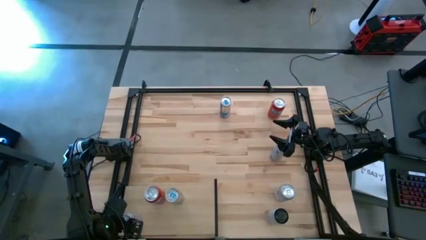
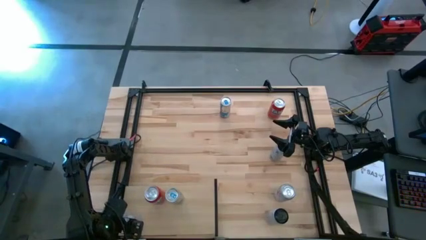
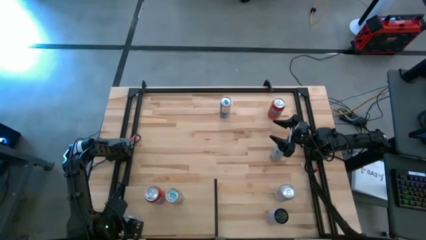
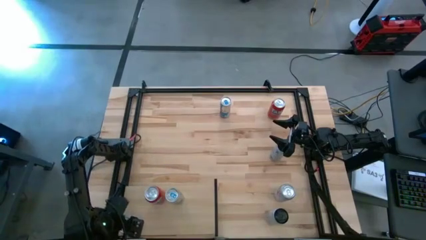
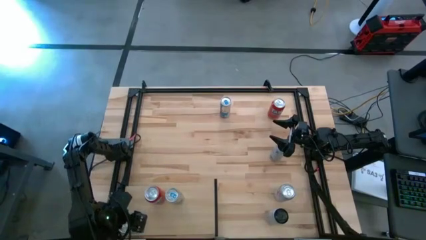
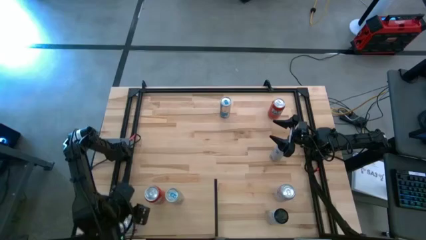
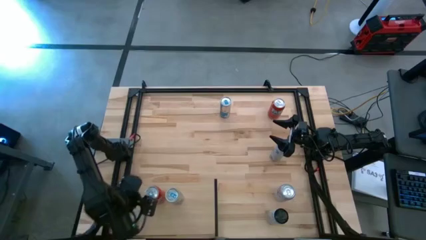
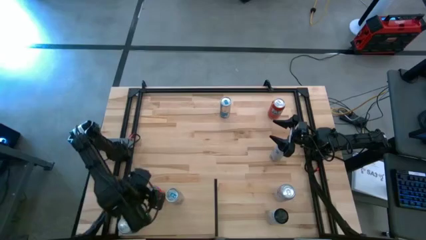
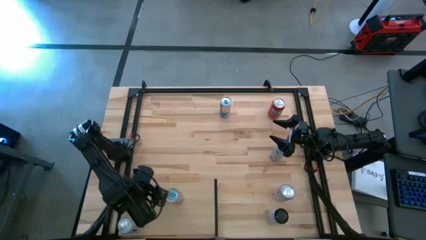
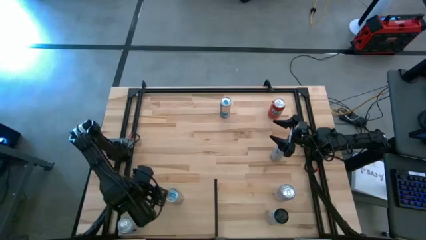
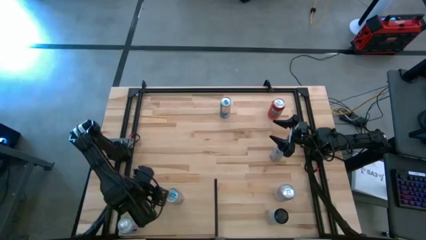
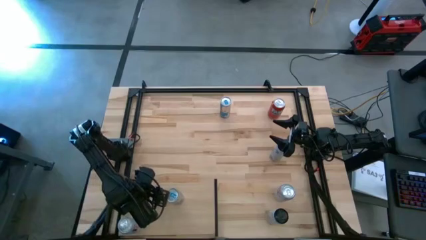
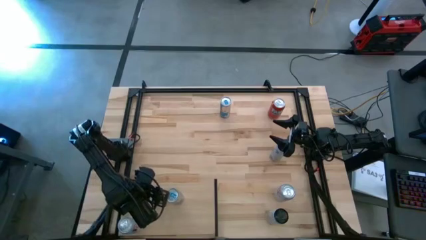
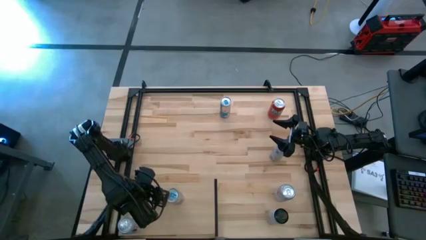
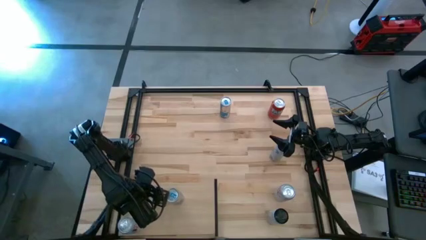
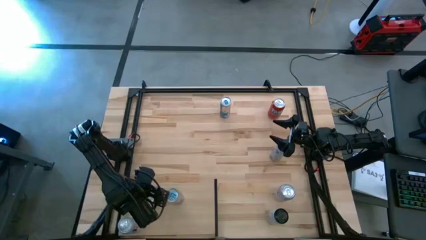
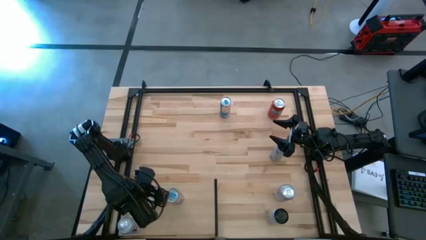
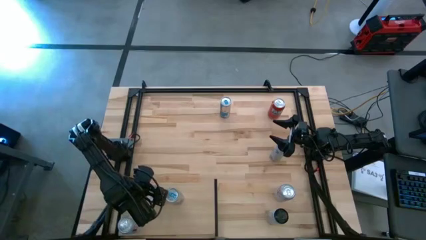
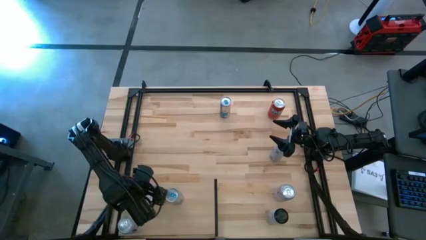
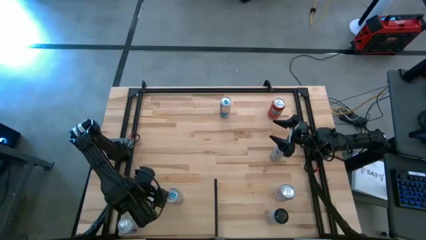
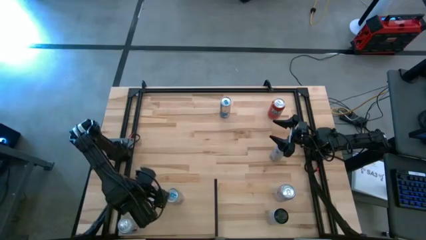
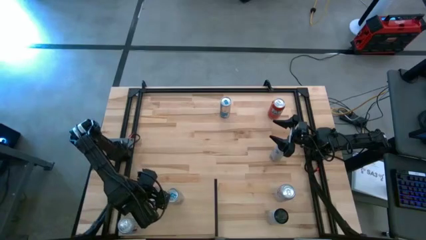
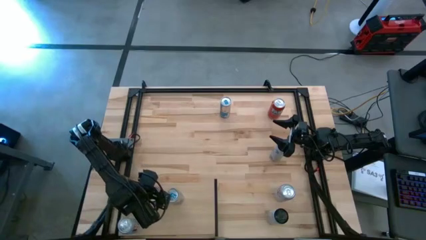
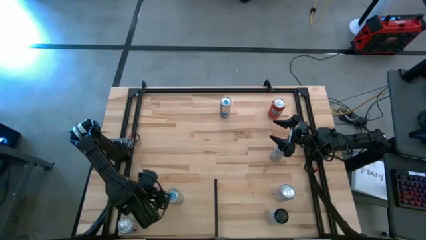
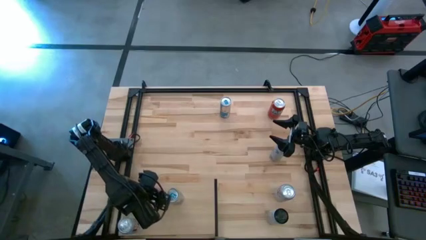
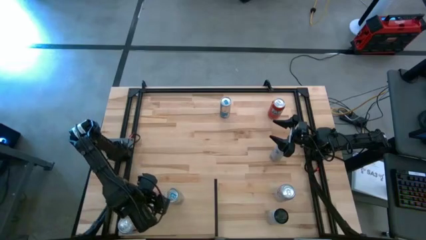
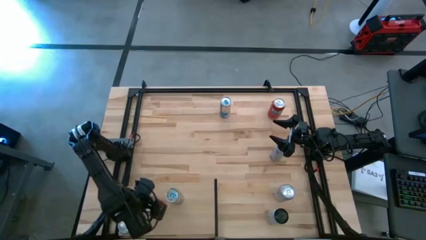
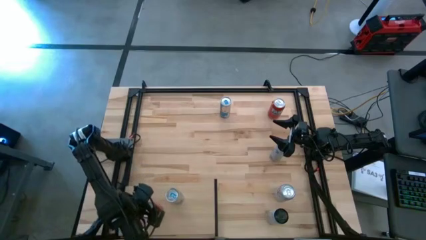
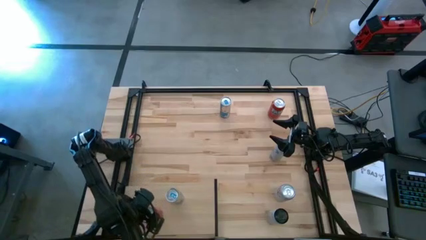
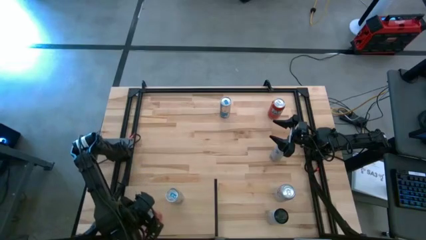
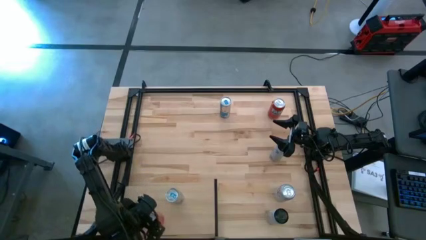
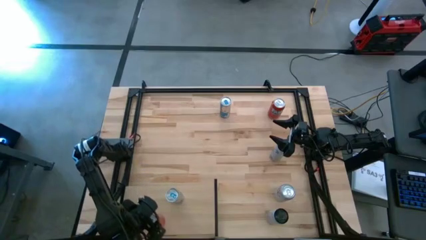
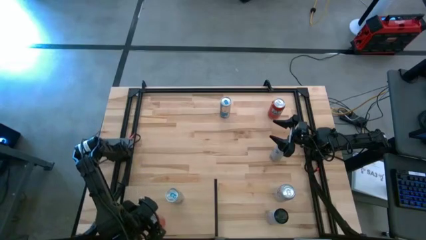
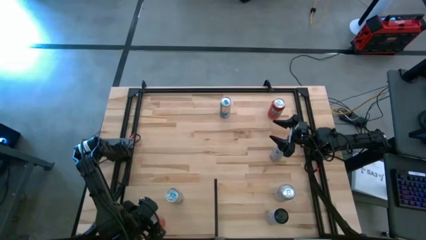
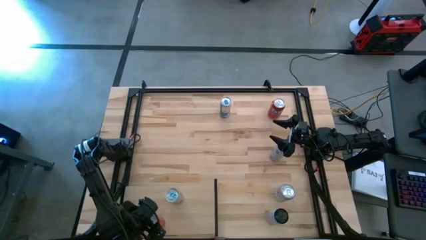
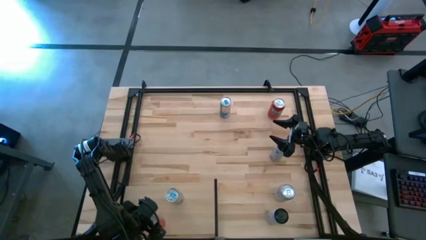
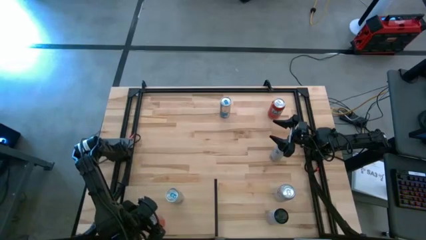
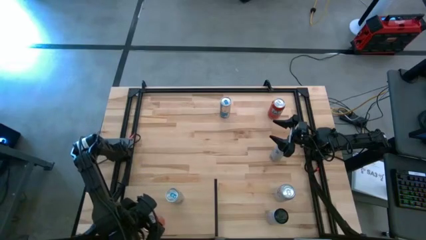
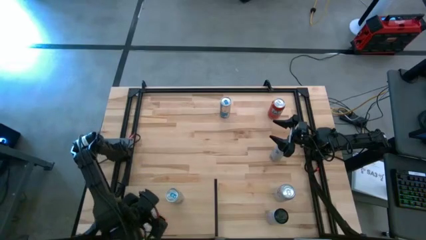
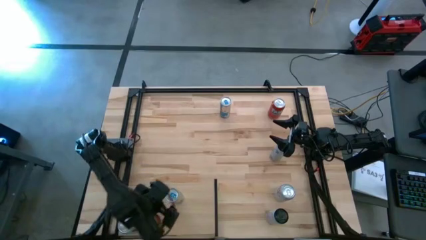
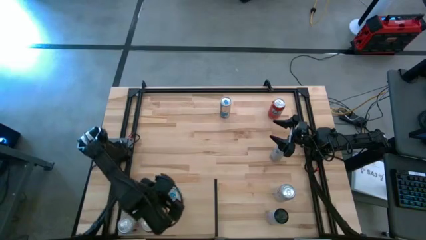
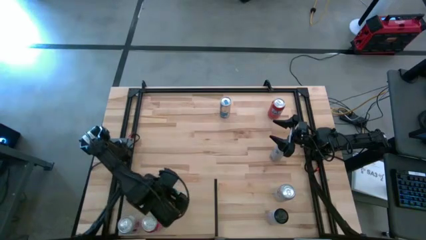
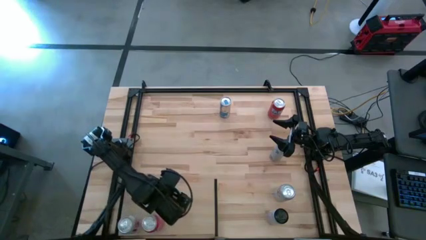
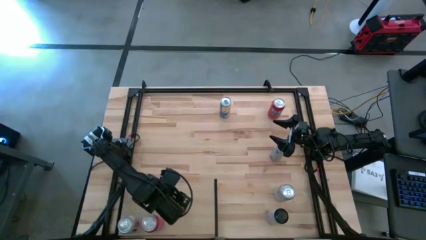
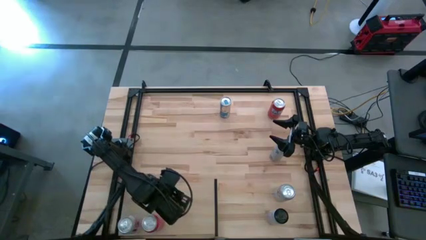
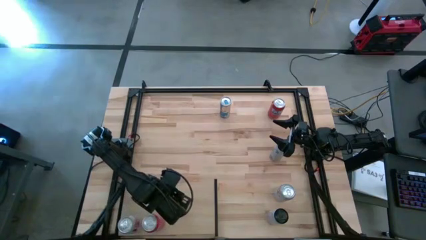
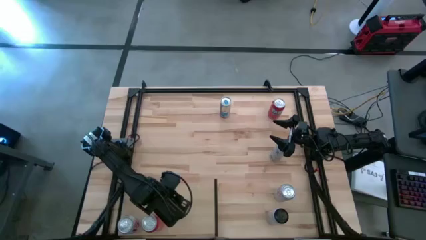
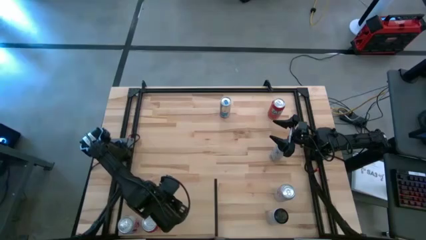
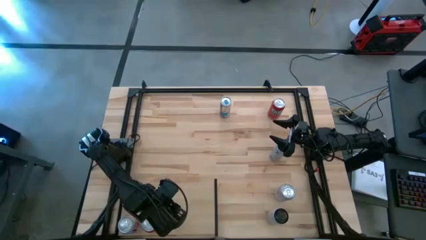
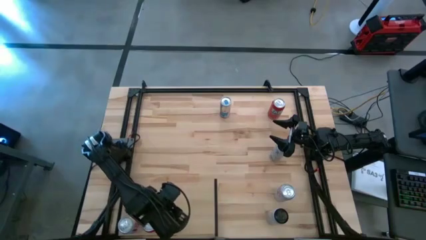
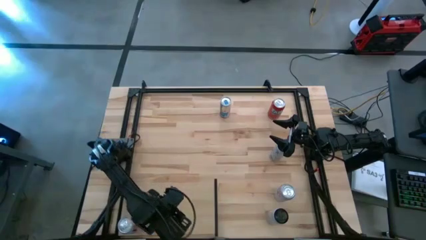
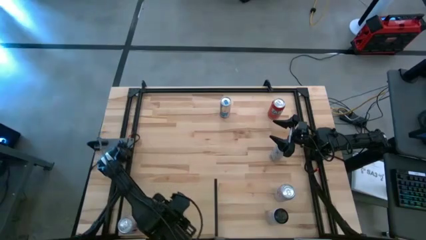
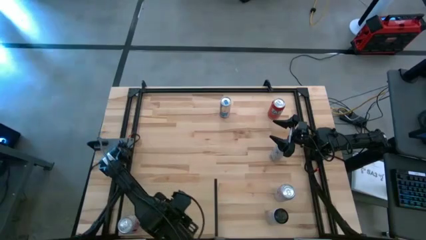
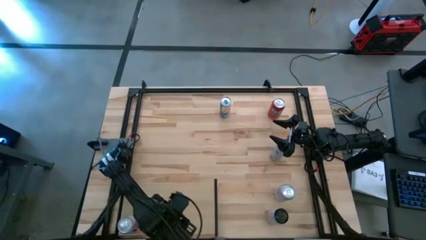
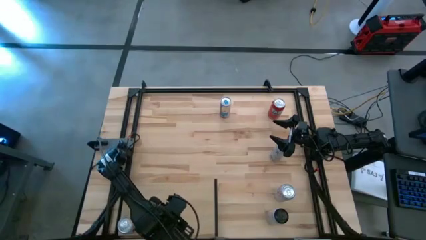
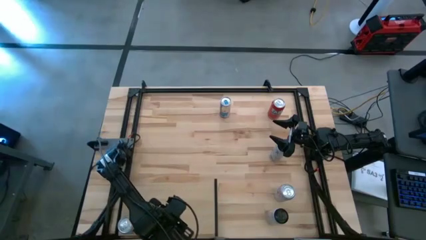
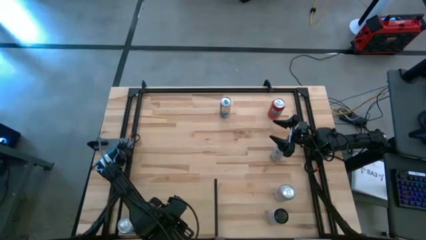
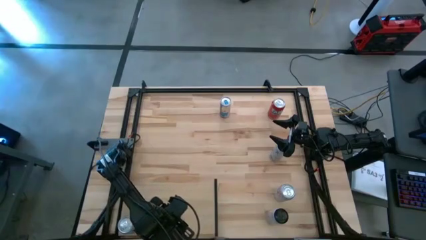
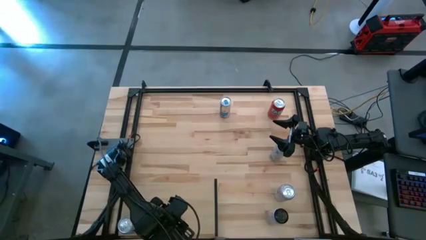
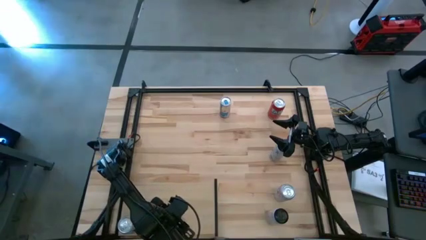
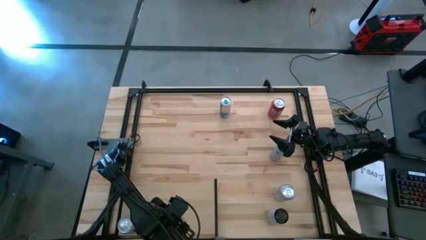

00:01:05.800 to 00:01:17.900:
Task: Place canned beverage on shelf
Adjust the soda cans on the shelf

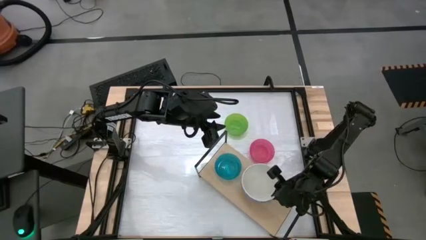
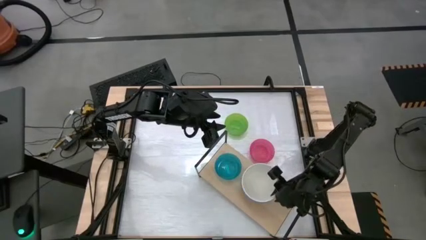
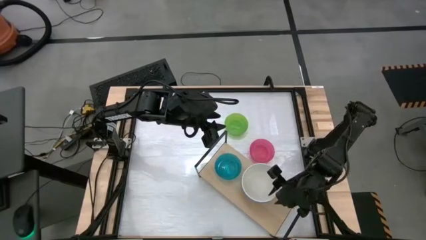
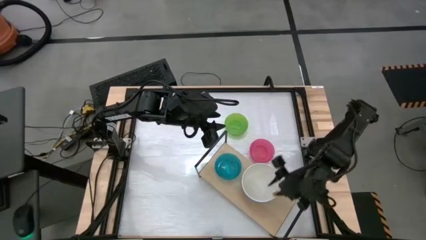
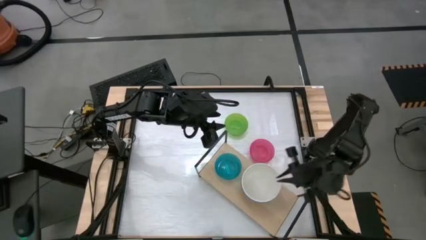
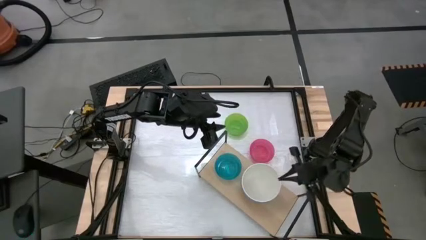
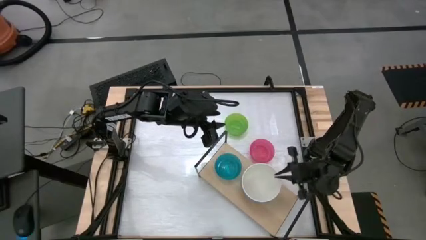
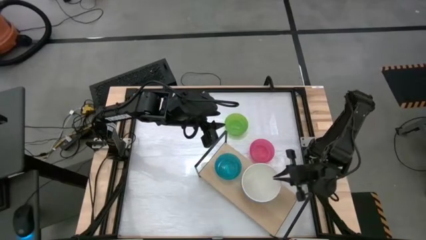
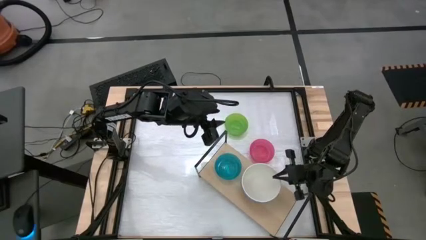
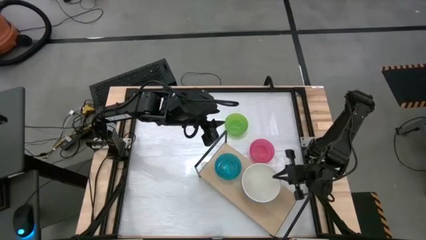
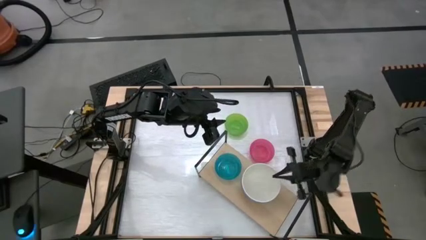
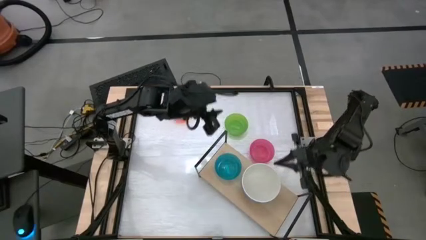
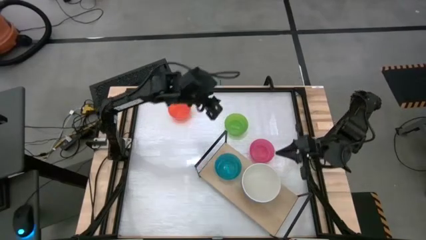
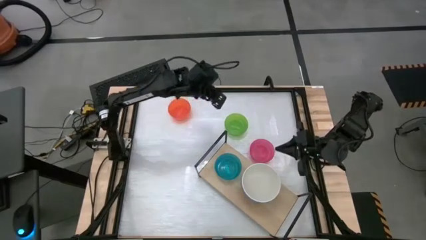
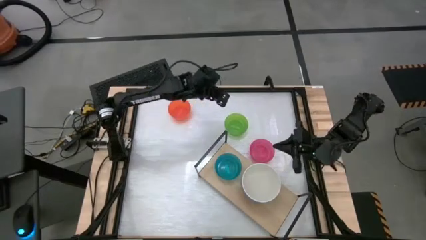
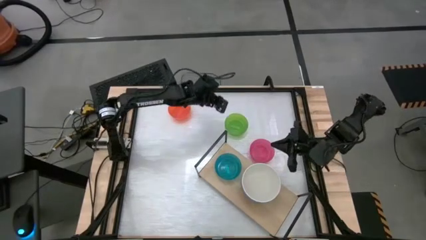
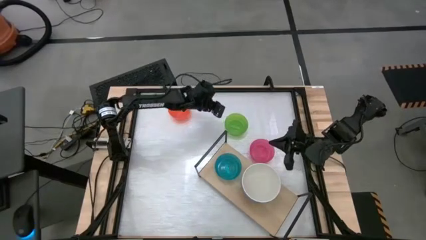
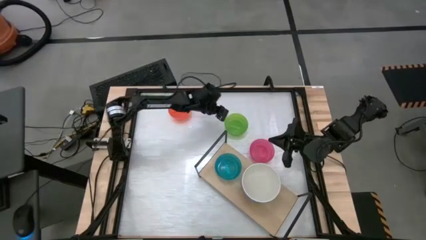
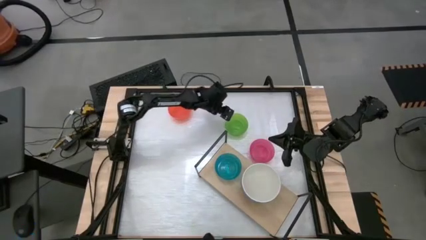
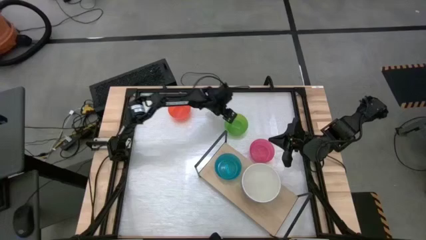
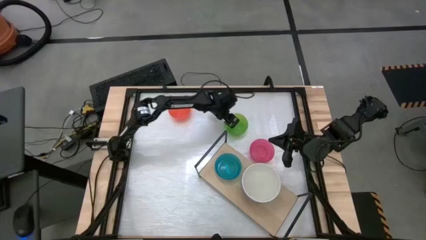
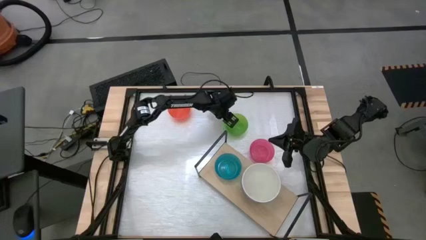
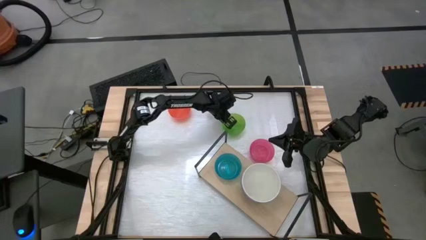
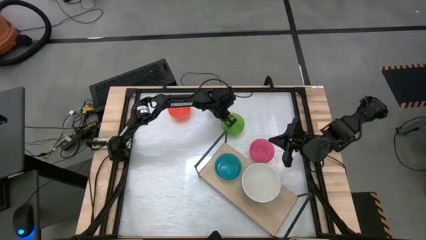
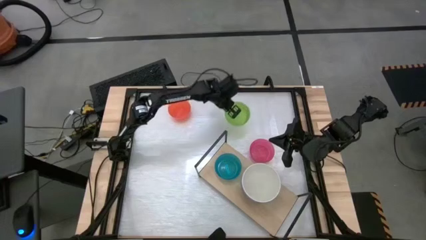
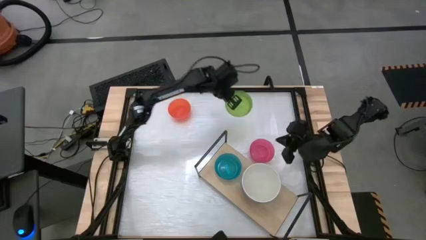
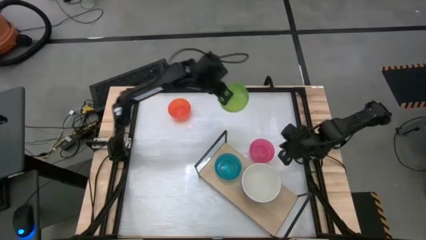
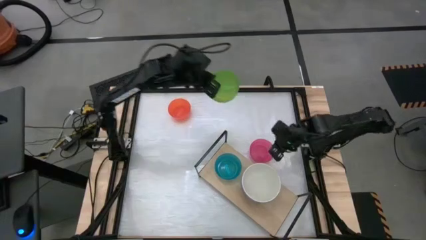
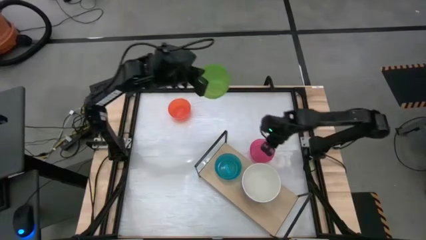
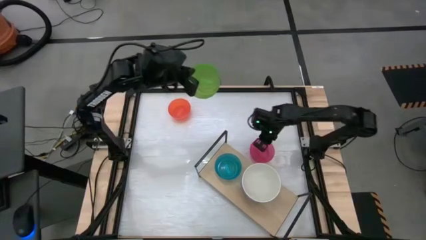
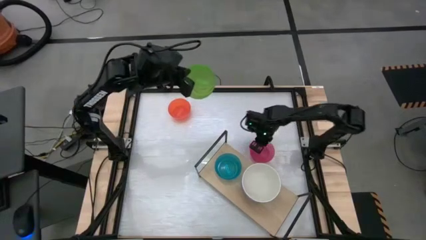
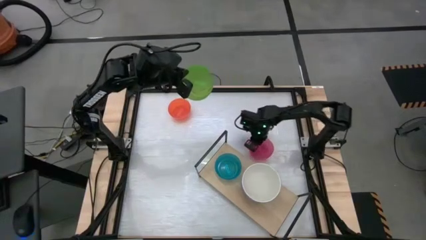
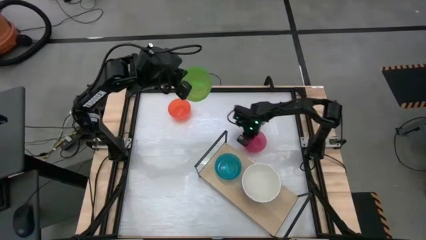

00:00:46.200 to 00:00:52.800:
Task: Place and stack bowls onto a shelf
Move the small pink bowl to the top center table
